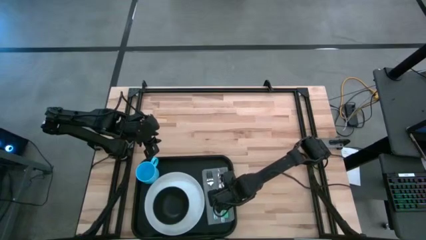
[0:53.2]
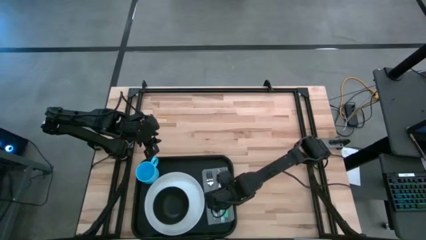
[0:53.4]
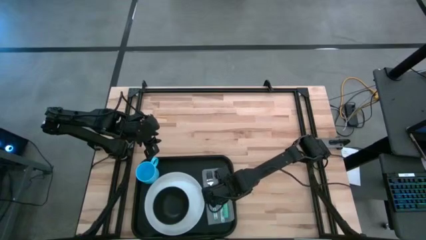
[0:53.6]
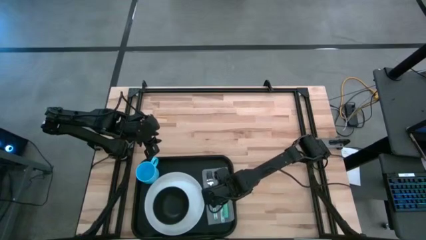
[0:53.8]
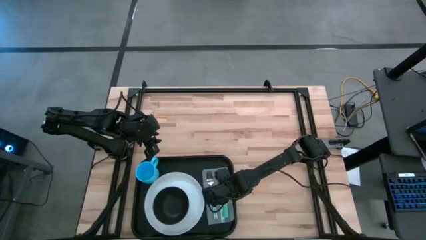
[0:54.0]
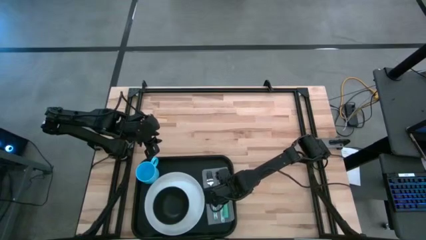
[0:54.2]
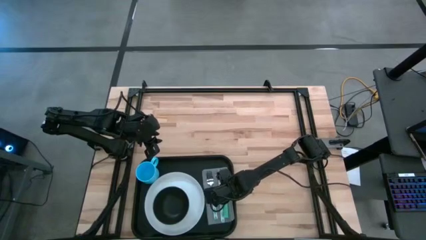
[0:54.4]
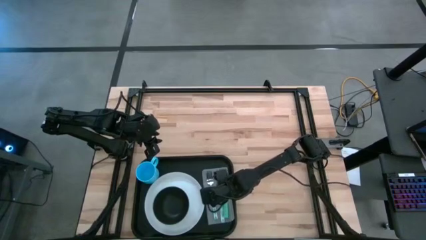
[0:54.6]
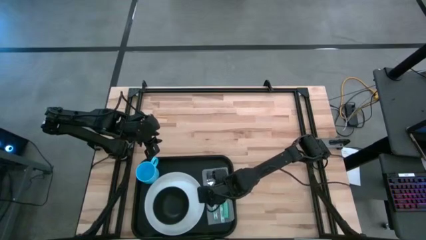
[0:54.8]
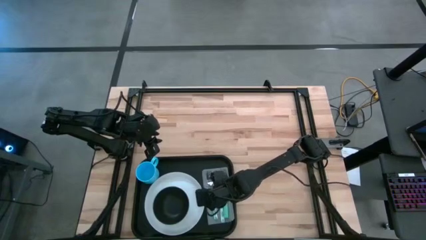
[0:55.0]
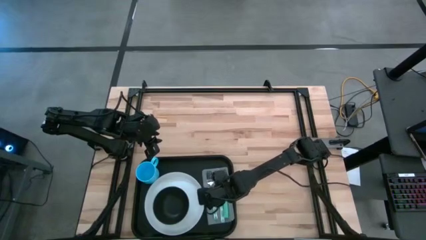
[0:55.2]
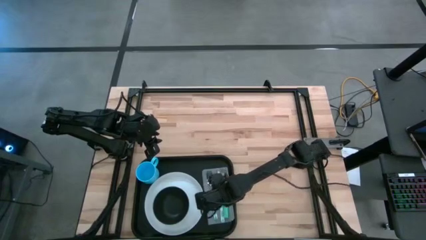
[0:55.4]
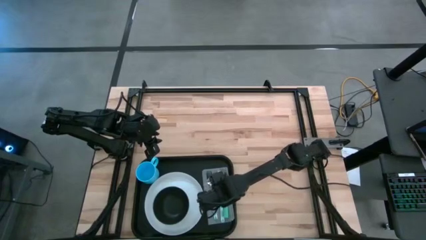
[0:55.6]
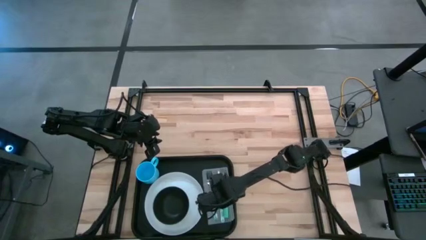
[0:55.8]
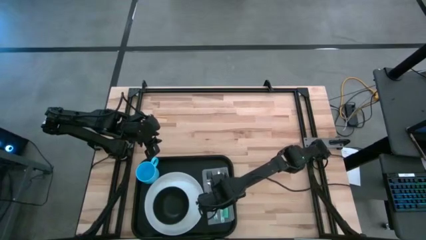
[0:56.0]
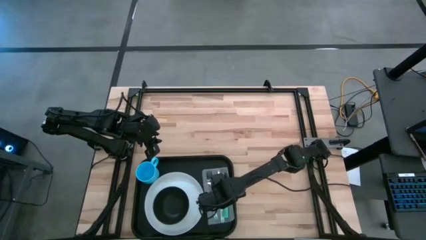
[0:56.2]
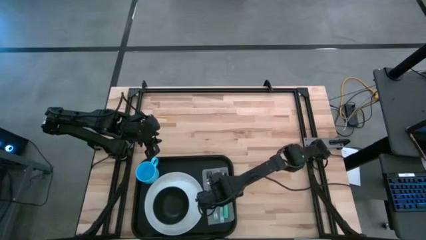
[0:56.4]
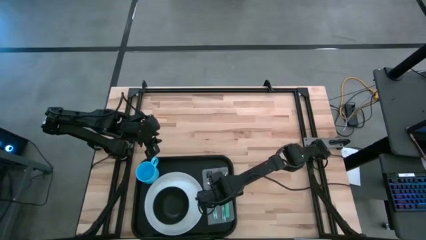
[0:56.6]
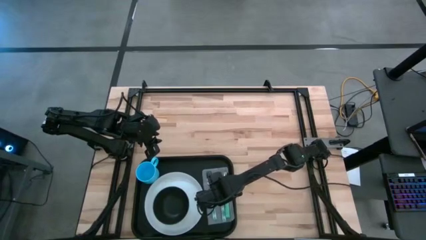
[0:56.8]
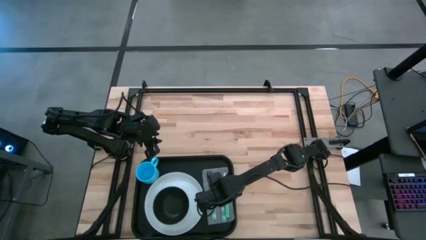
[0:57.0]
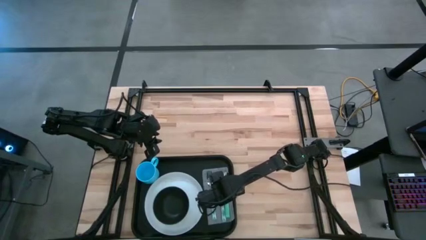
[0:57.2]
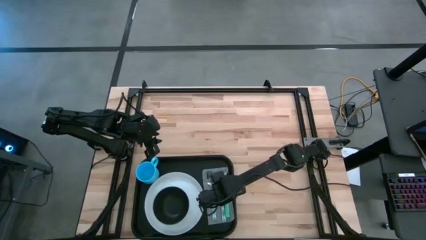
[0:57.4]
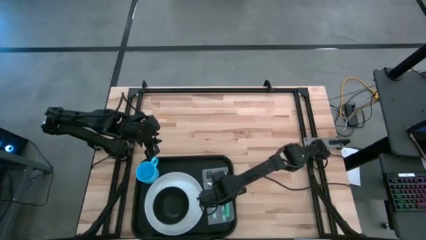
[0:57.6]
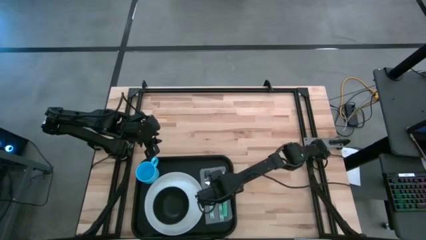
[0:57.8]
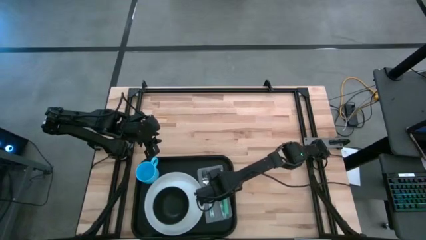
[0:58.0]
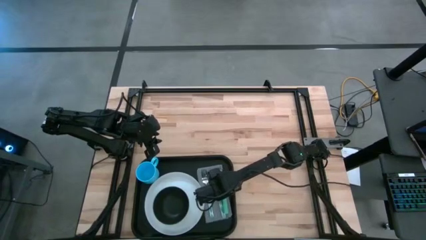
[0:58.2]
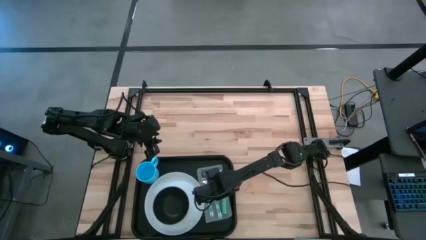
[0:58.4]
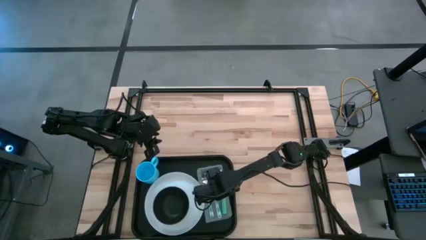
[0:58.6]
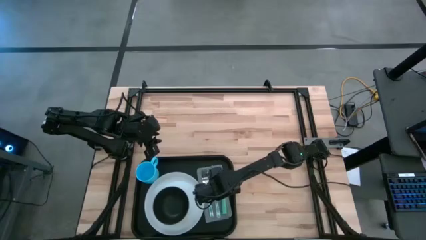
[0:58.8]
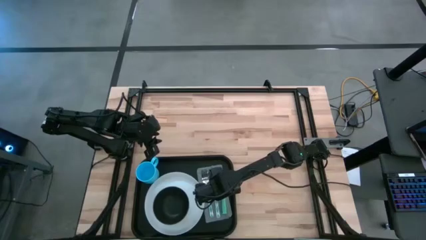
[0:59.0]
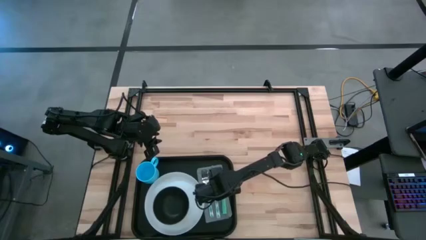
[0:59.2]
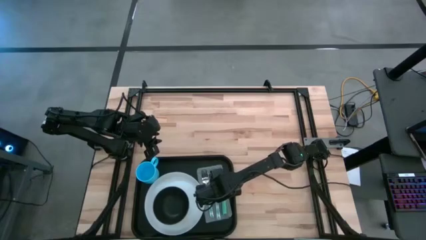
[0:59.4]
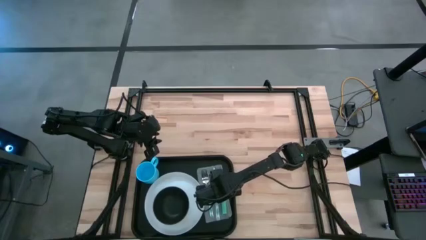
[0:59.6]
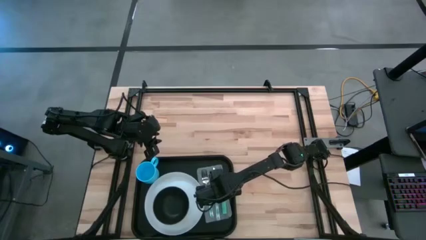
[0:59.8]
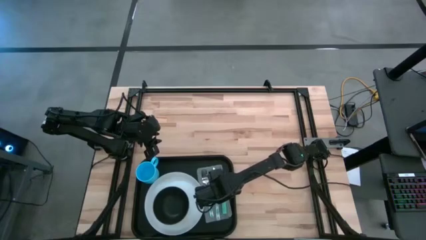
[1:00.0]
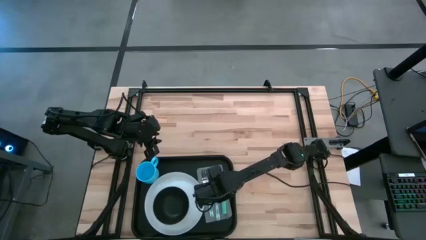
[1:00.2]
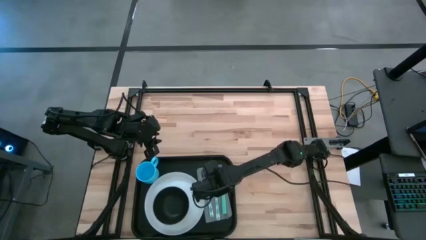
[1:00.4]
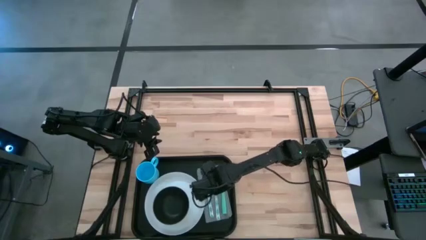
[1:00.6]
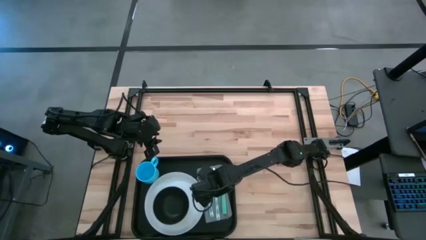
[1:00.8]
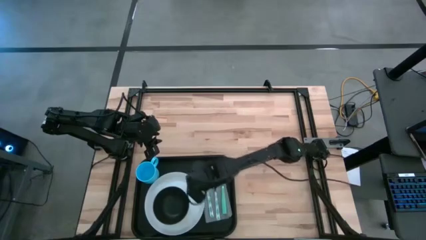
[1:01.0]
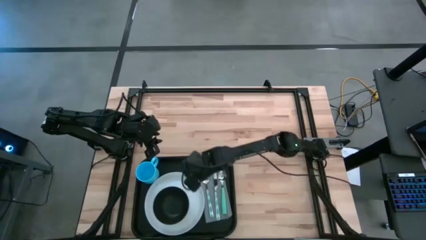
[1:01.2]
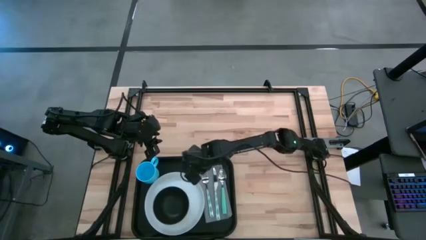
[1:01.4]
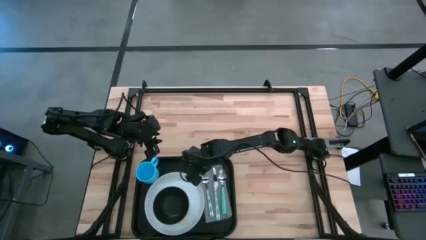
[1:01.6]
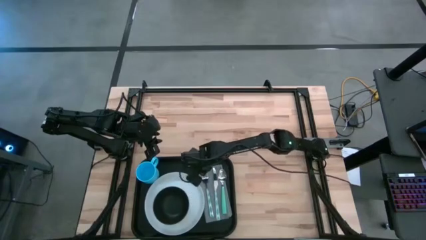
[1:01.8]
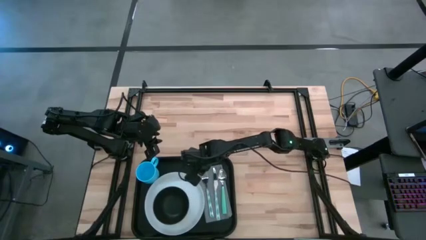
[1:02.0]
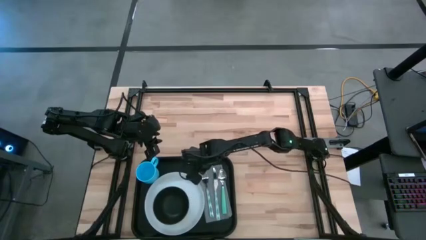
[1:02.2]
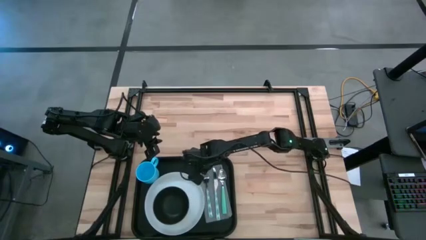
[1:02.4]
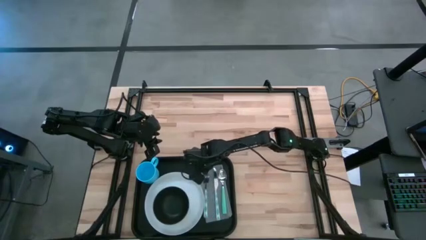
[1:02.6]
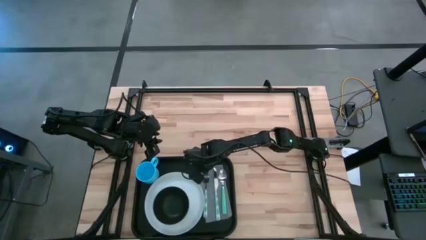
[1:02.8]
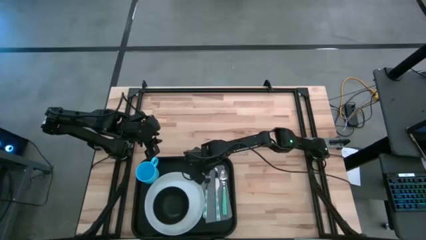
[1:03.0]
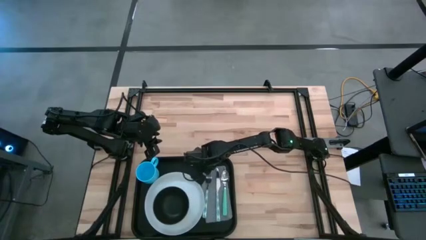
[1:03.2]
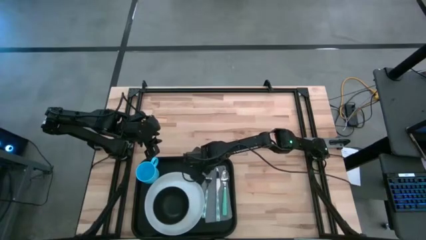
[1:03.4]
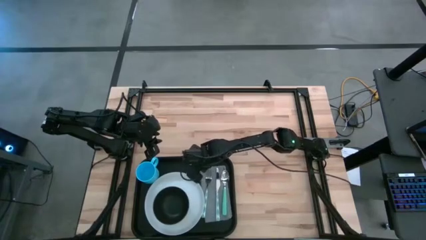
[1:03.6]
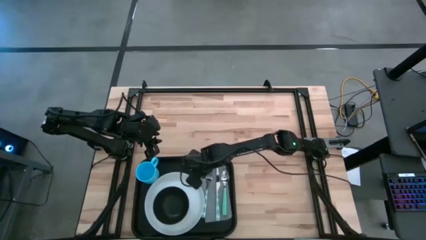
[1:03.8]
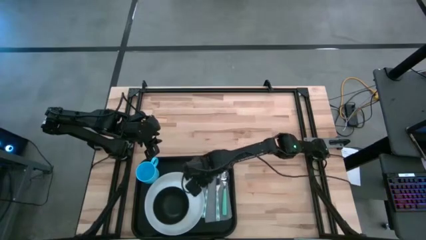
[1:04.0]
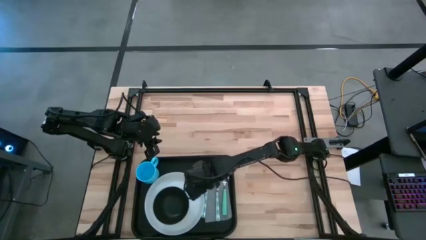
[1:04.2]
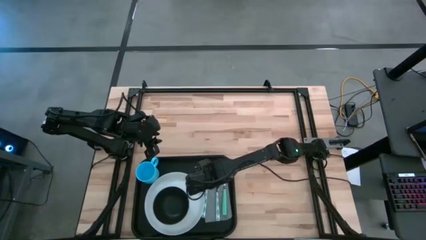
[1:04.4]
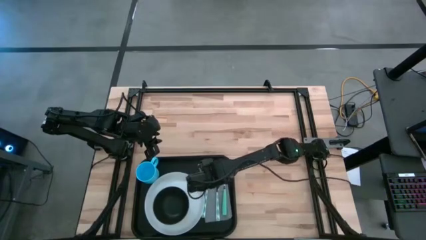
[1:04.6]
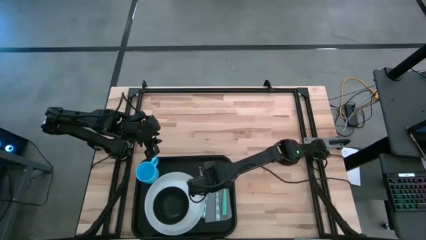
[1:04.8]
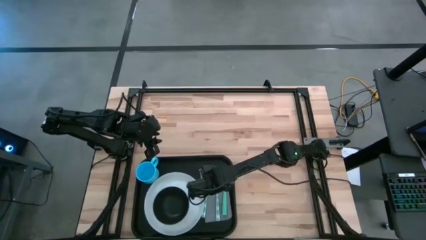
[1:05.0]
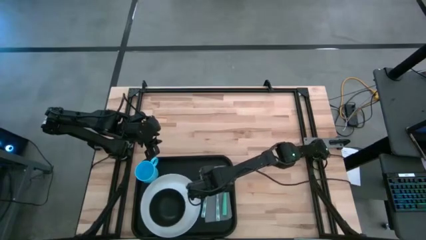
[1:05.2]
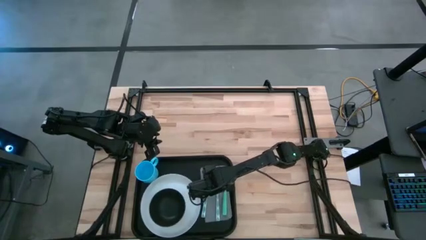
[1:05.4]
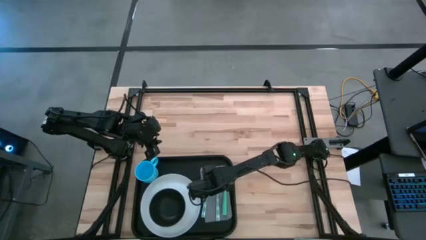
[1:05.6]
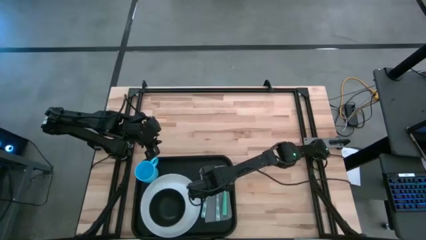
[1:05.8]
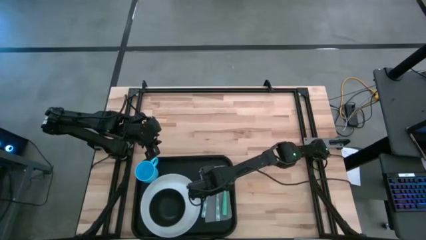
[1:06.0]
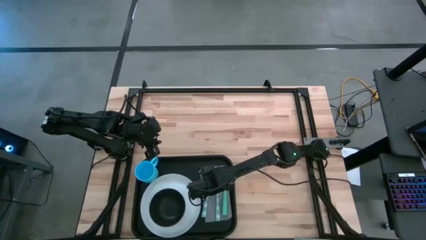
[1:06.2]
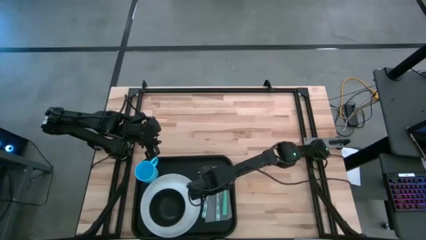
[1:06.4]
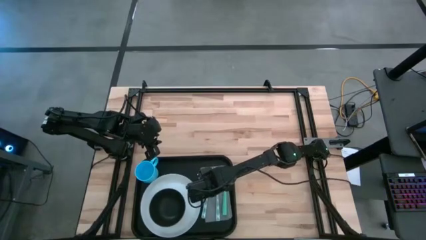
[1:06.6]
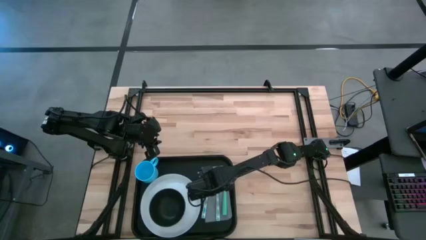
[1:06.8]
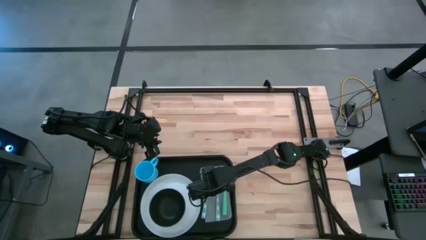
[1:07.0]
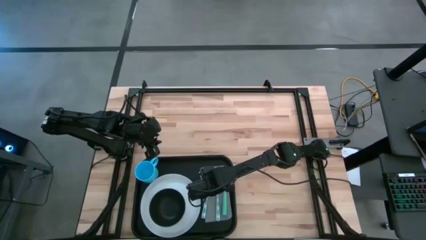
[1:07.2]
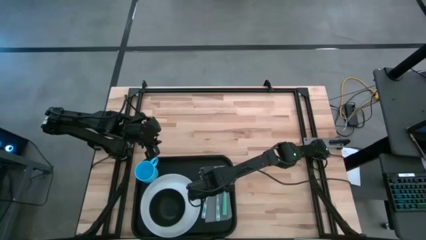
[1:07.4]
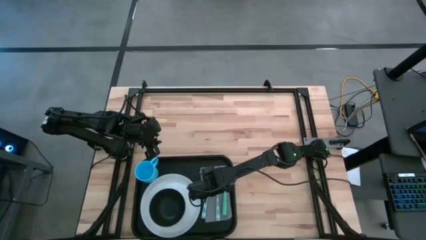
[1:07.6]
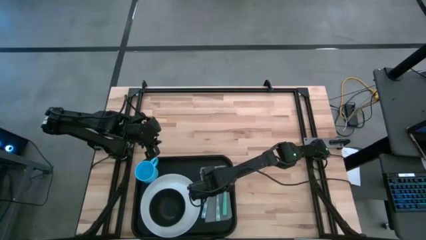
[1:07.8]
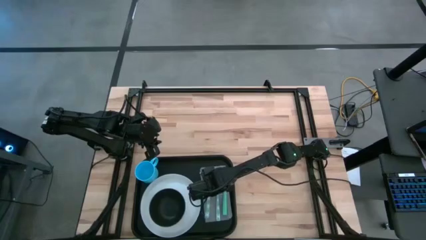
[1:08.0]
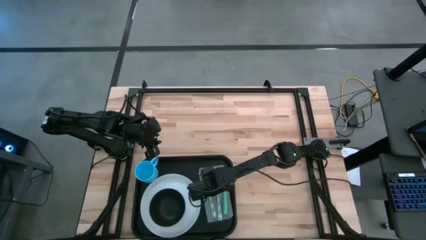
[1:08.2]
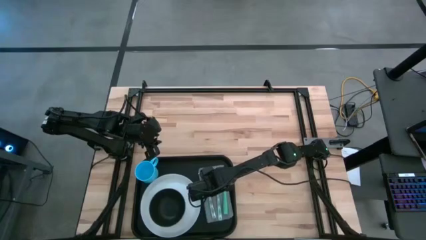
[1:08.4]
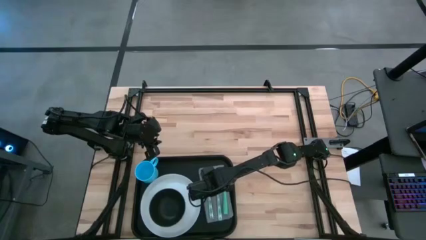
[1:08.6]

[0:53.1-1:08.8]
Task: Set up tray
Adjust the silverware on top of the gray napkin

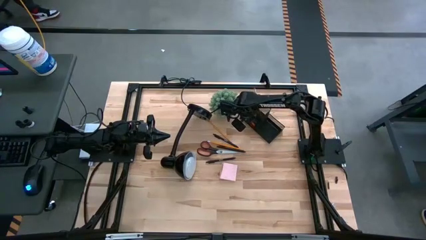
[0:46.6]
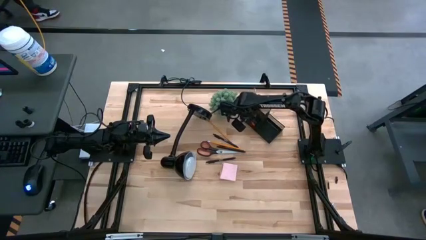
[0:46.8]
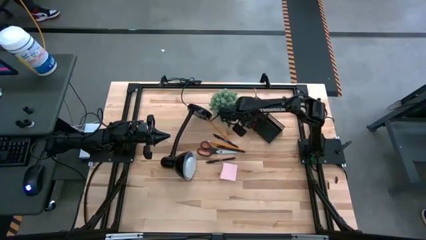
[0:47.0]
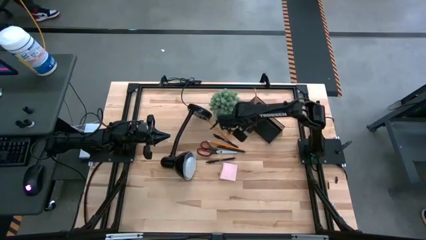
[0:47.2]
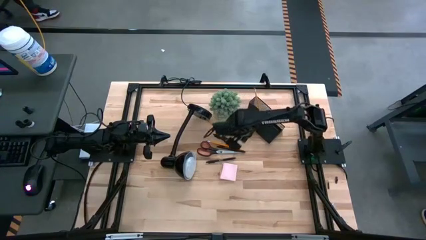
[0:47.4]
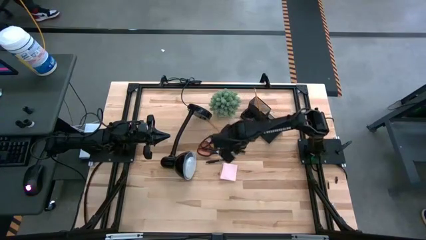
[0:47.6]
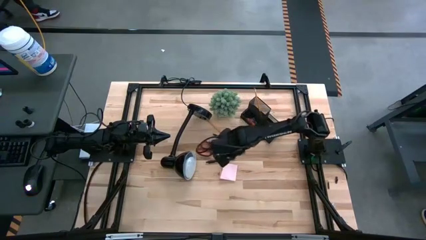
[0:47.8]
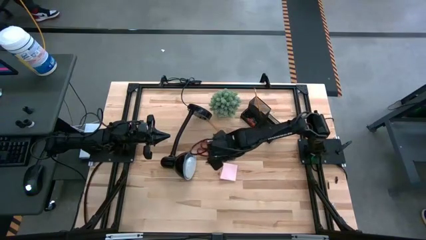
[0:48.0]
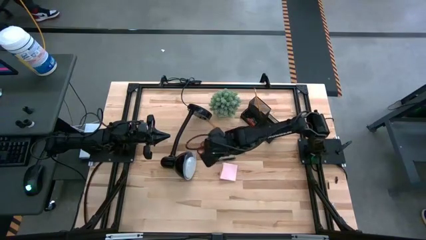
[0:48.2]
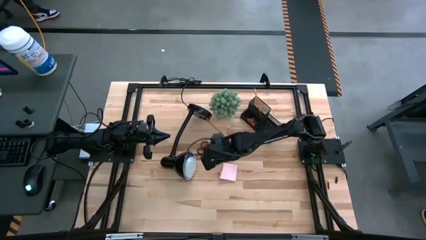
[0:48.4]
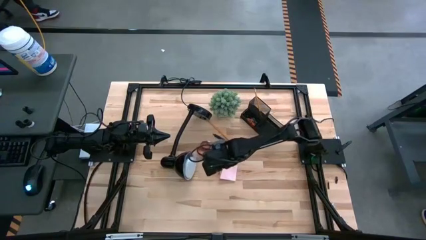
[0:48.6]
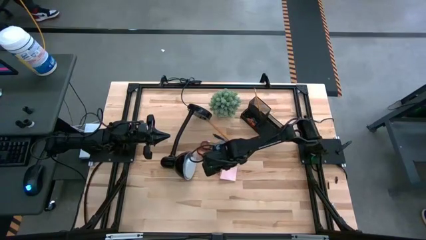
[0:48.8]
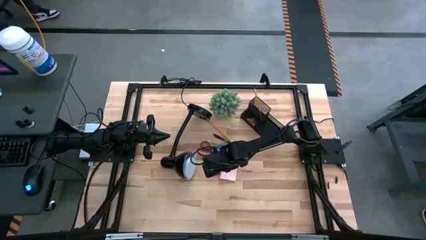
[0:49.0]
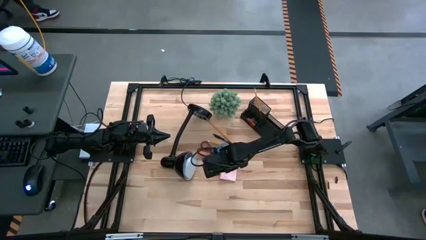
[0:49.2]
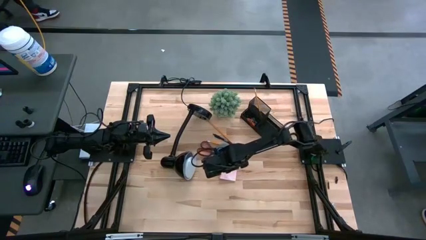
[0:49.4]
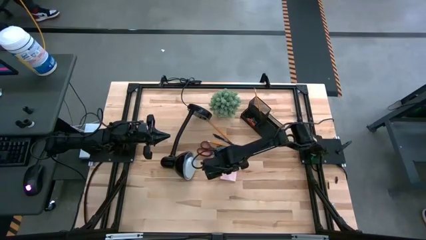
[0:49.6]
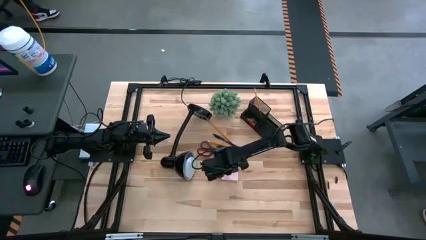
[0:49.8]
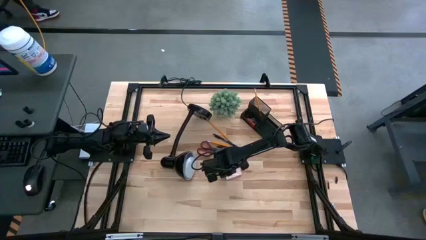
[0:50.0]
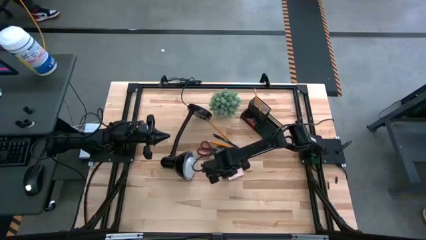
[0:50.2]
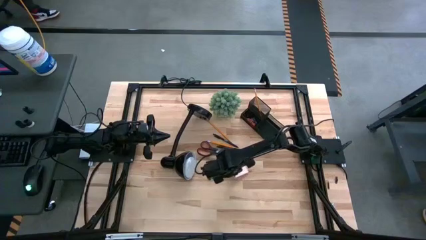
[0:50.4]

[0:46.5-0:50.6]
Task: Pick and place office supplies into organizer
Put the sticky notes into the right section of the desk organizer
